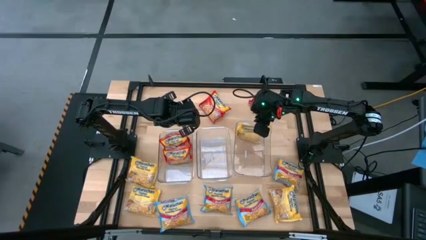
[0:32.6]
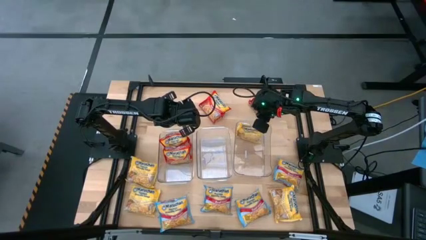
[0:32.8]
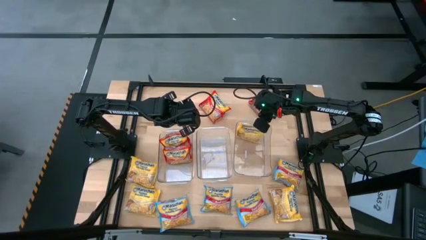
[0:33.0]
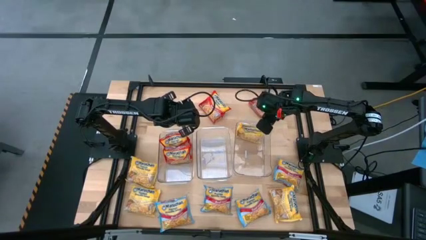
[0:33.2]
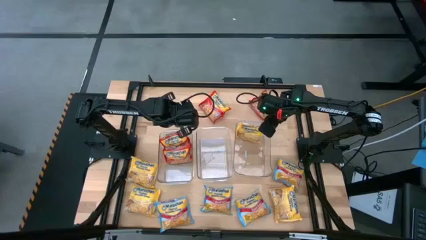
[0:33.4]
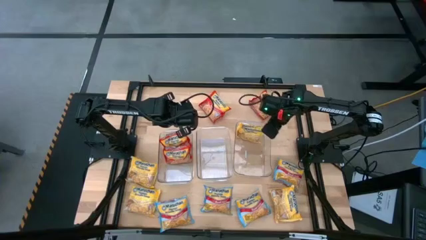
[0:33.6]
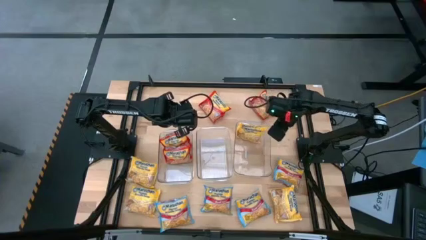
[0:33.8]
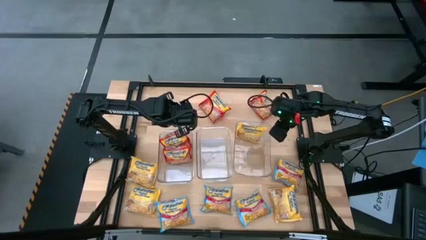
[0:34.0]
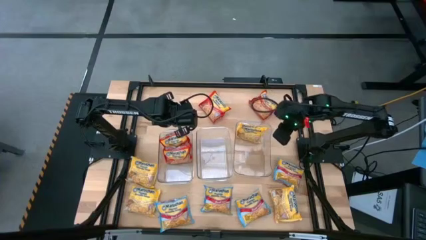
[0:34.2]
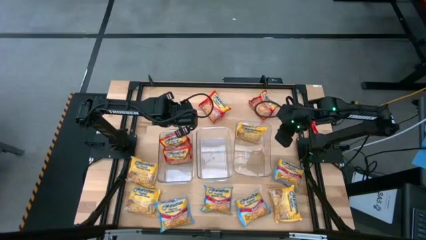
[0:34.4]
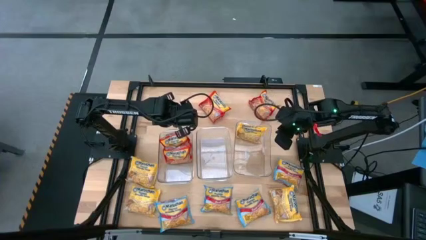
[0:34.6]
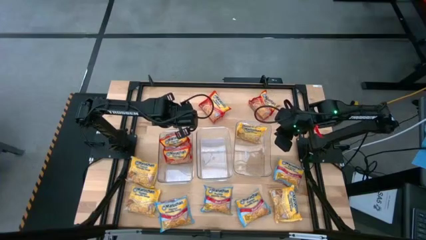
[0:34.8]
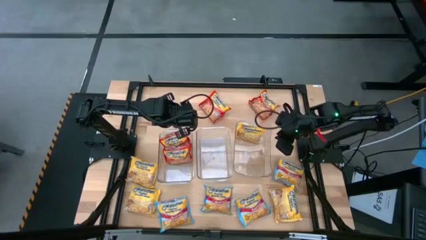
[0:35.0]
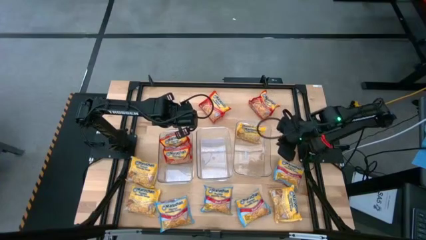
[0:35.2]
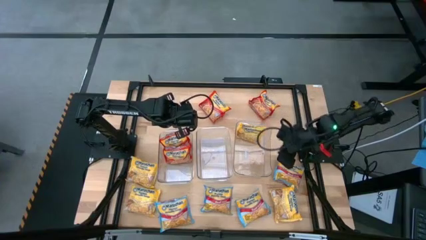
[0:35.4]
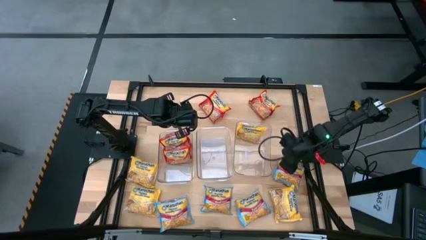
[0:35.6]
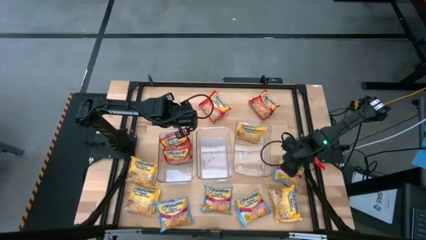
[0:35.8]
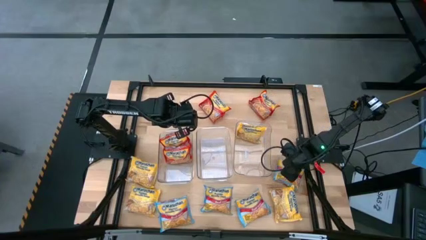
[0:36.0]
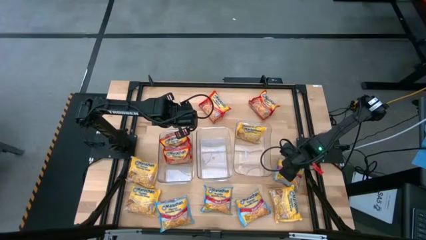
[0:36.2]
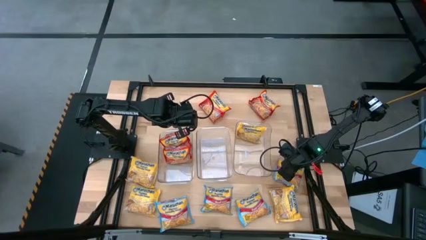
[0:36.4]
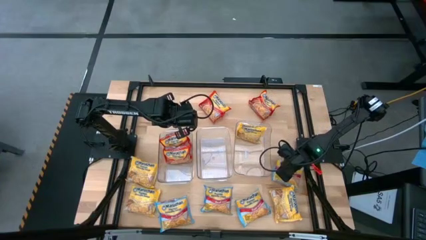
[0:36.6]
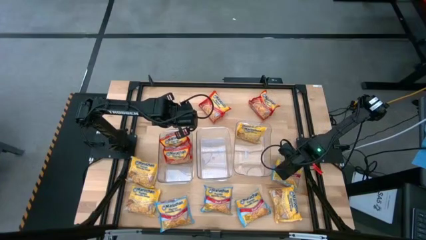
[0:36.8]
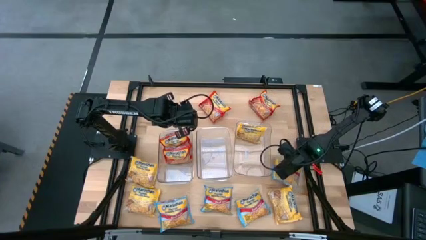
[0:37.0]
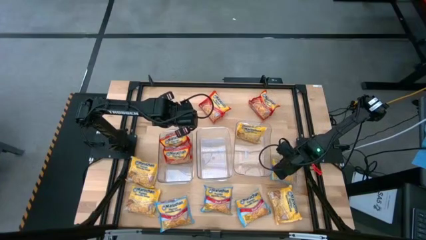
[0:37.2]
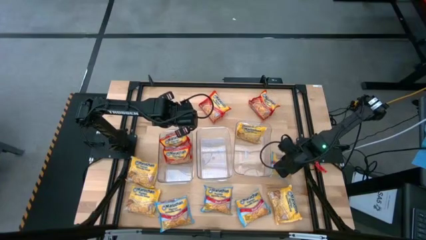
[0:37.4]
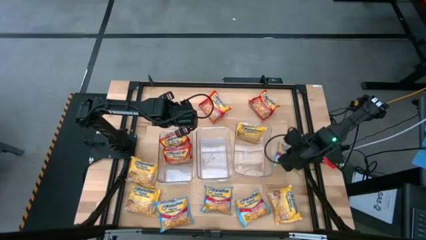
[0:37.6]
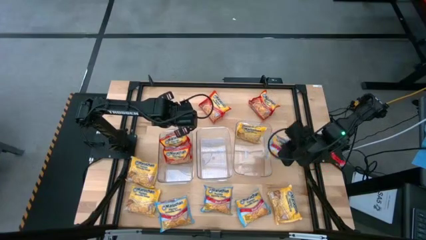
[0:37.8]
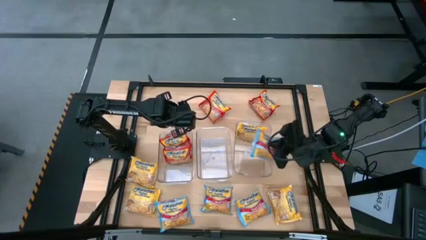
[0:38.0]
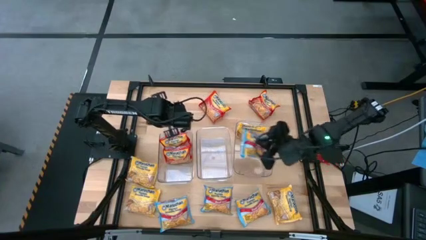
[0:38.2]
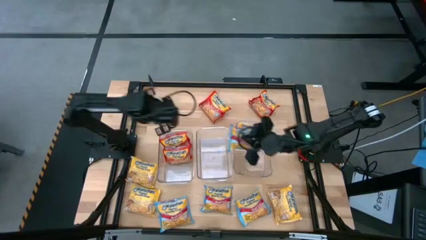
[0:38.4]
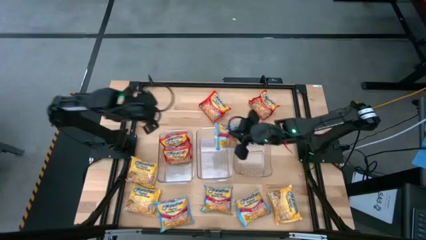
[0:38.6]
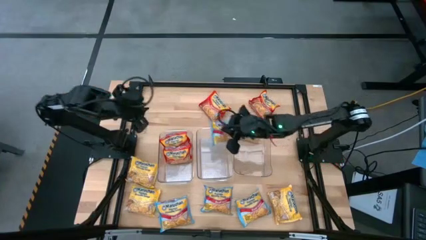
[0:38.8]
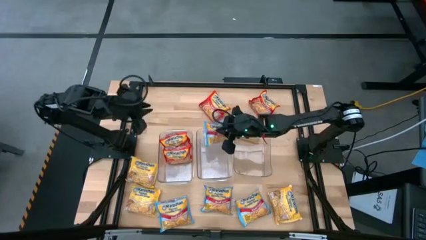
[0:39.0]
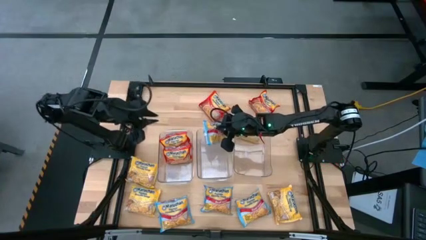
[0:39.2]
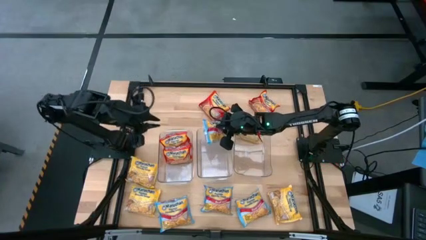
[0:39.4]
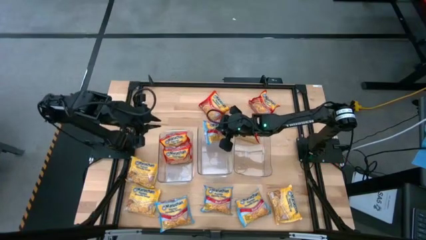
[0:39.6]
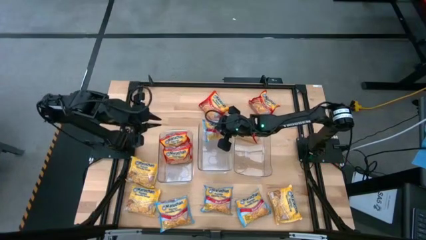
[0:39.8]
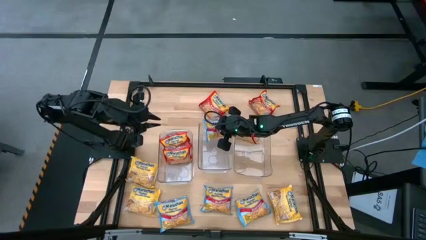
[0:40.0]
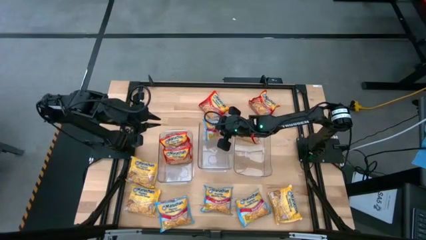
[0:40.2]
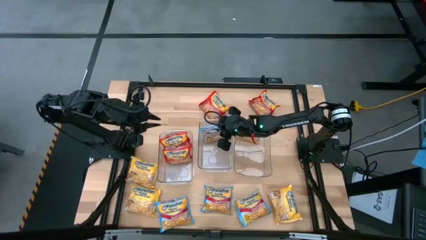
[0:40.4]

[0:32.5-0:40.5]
Task: Sort Maruchan noodles
Put the blue noodle pack into the middle transparent bin

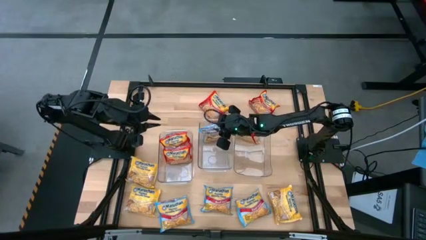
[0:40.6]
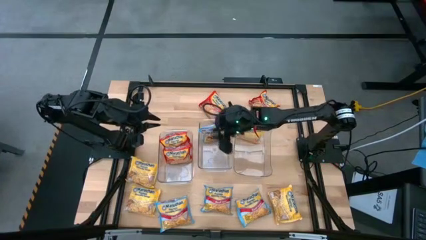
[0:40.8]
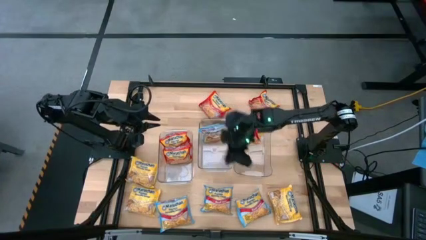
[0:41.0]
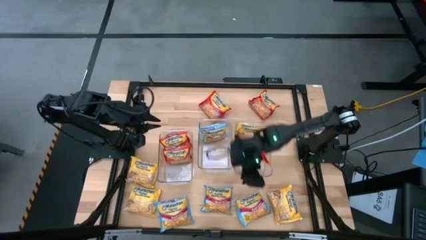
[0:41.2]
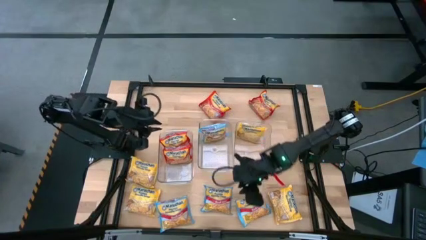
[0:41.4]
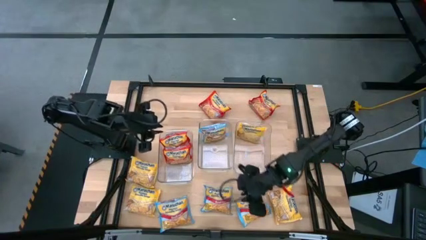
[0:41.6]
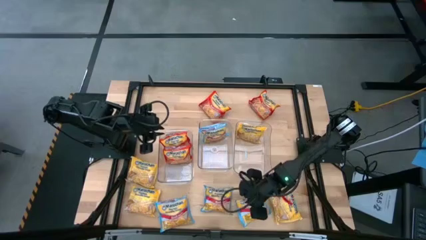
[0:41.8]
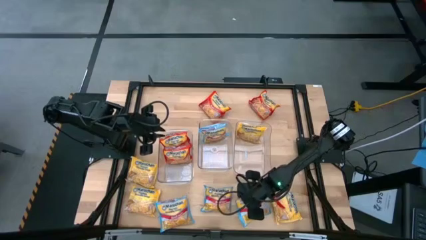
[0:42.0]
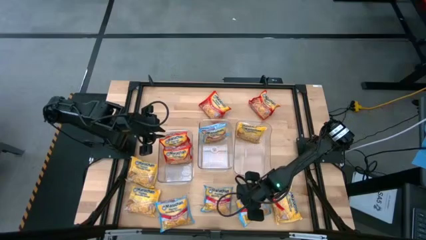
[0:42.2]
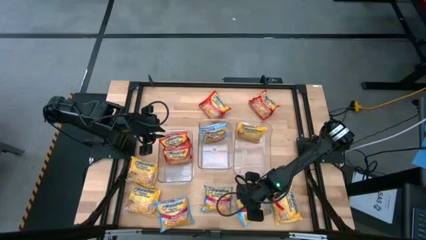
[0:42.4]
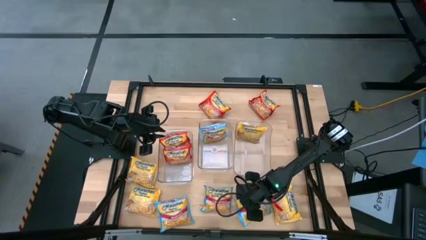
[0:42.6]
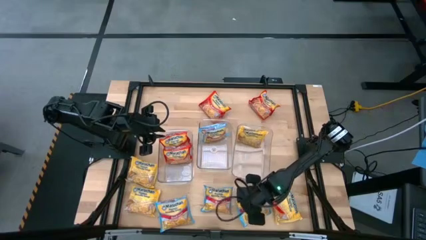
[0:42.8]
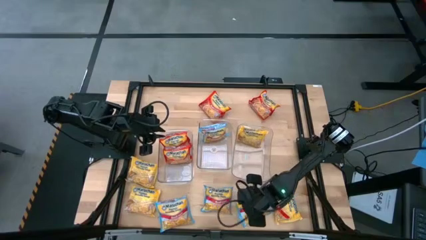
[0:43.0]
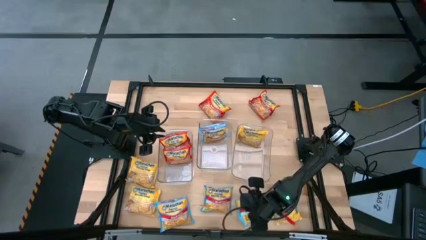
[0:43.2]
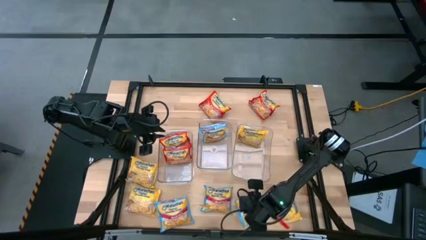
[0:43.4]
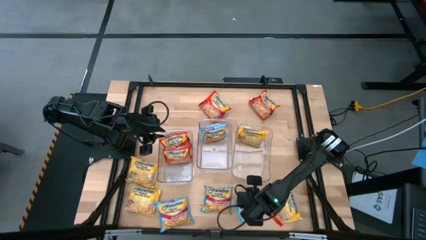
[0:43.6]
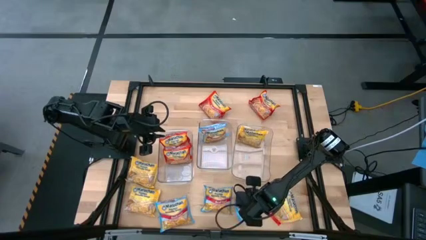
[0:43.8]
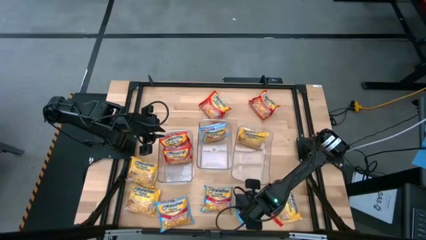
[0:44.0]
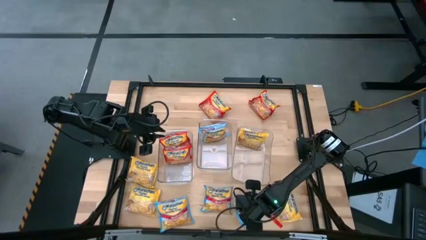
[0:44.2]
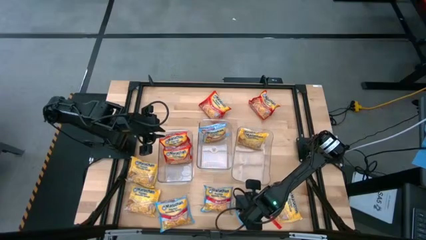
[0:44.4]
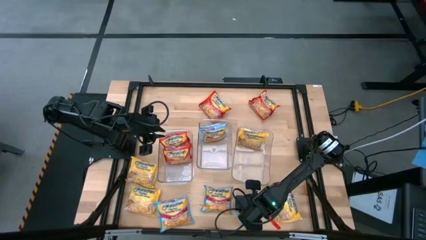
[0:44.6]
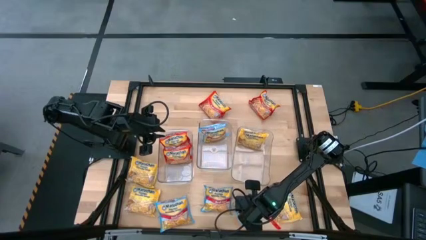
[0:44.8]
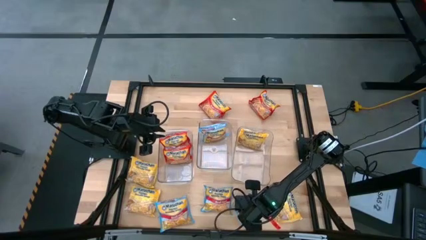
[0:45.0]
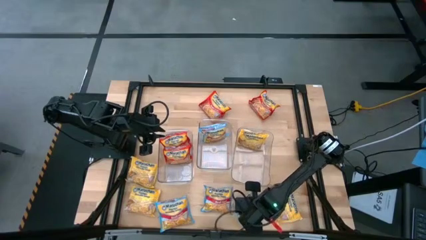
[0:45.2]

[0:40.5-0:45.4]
Put the blue noodle pack into the middle transparent bin

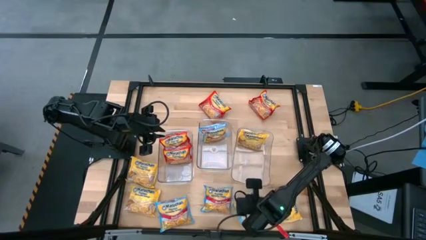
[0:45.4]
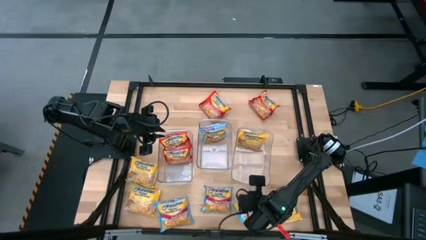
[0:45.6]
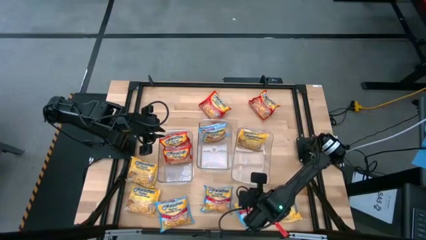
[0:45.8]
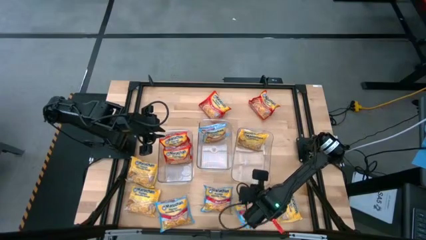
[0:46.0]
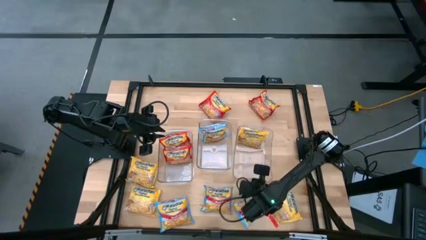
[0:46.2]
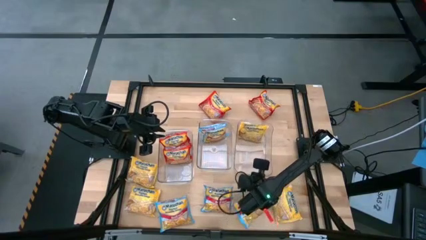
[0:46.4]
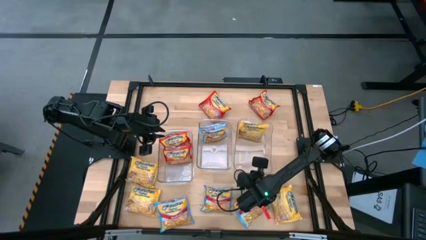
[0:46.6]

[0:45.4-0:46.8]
Adjust the right transparent bin

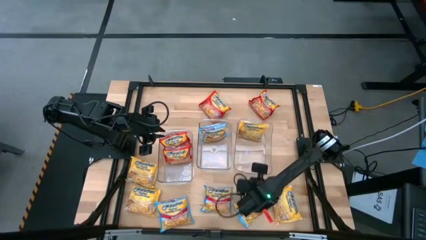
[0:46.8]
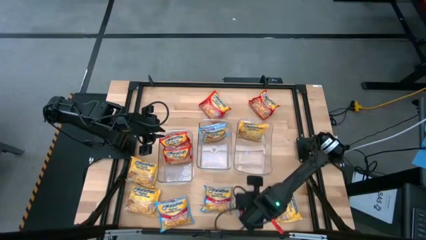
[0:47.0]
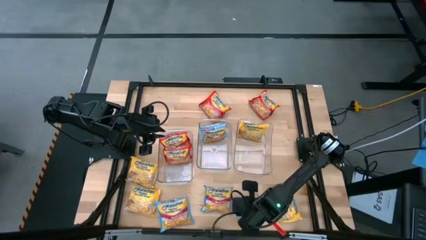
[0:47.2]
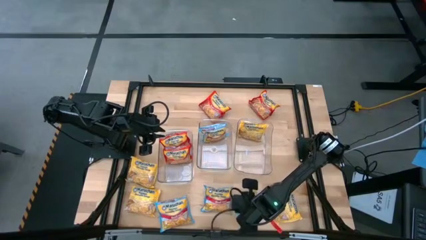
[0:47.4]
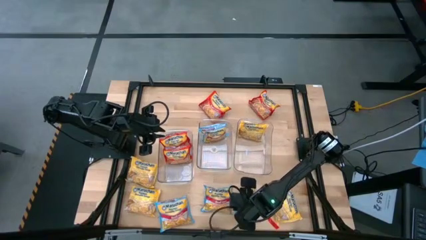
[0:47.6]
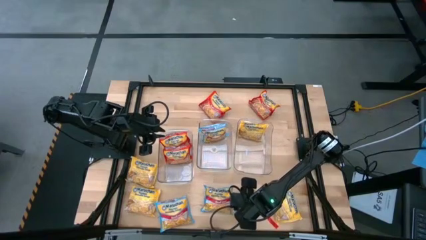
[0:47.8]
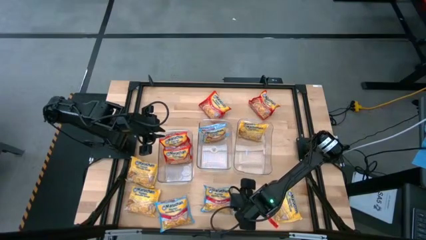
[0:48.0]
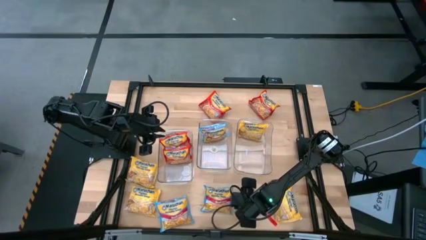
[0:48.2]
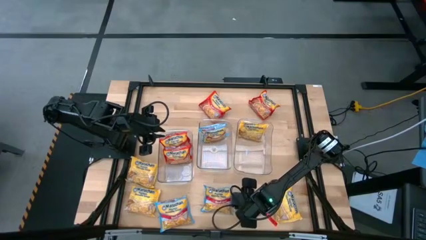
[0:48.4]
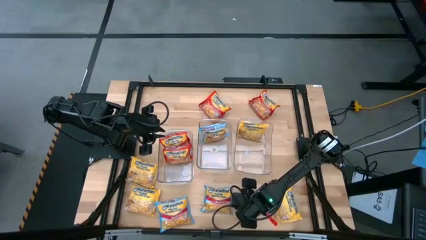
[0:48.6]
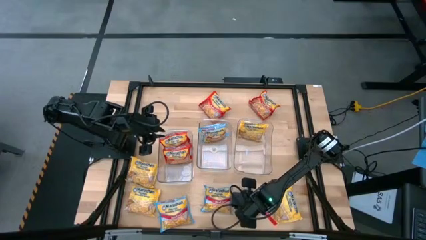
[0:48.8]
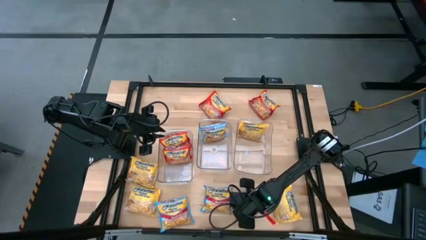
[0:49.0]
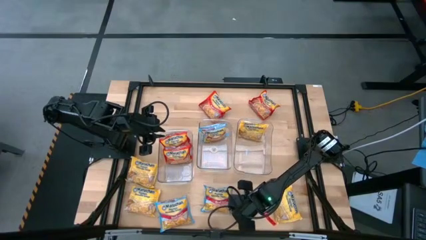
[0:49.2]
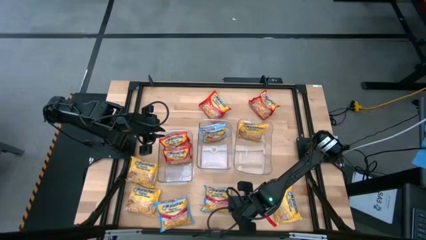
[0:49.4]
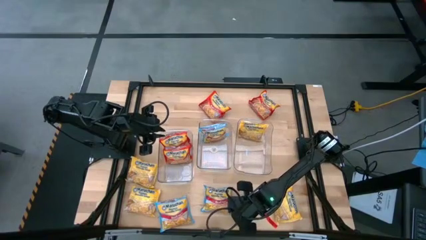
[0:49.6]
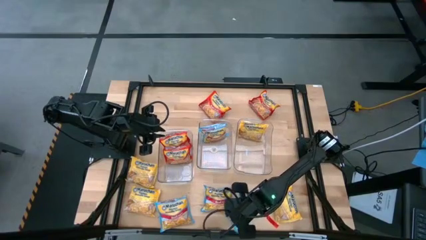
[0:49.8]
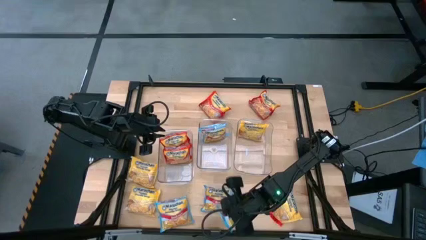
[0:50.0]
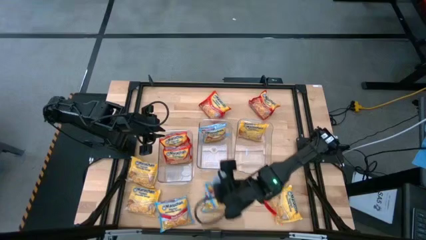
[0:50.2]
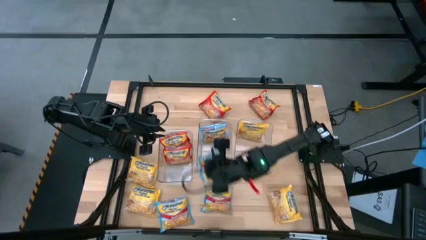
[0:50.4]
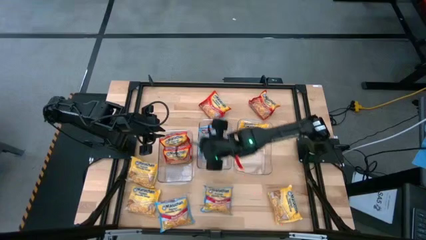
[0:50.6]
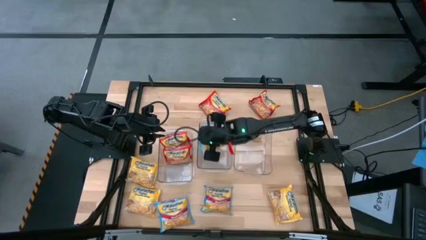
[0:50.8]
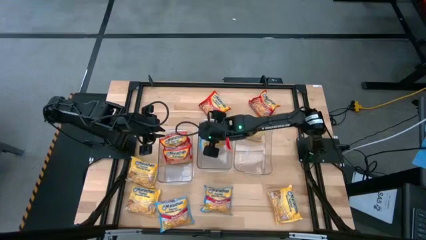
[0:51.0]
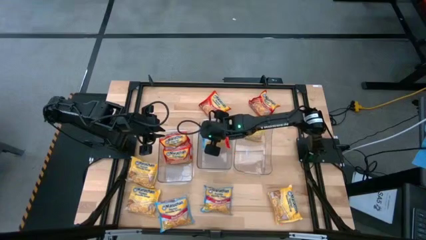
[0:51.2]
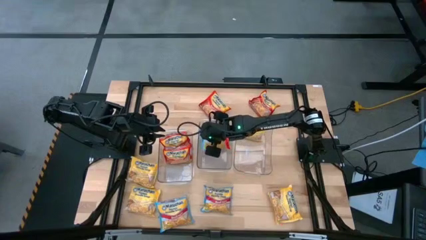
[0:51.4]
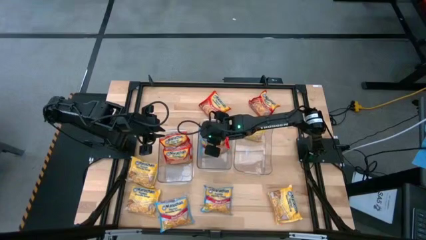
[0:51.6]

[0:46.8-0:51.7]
Put the blue noodle pack into the middle transparent bin
